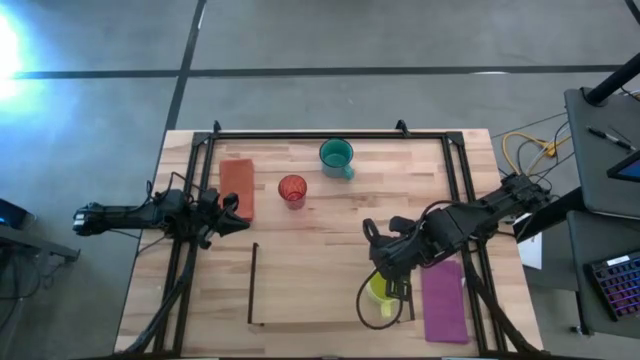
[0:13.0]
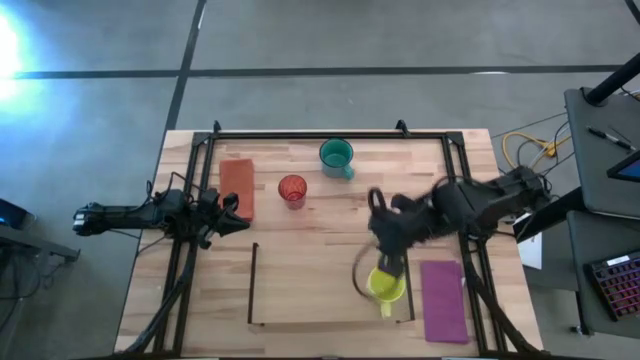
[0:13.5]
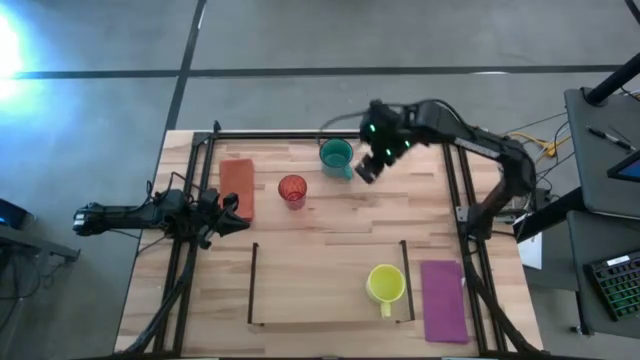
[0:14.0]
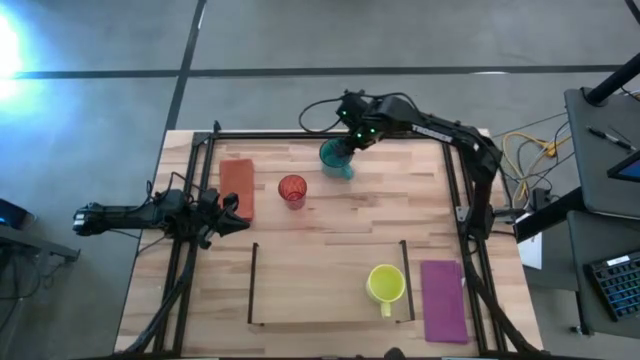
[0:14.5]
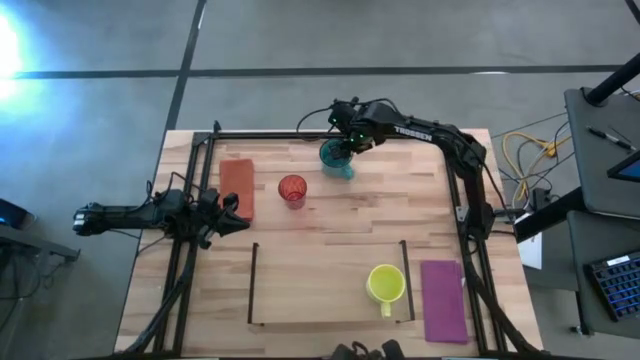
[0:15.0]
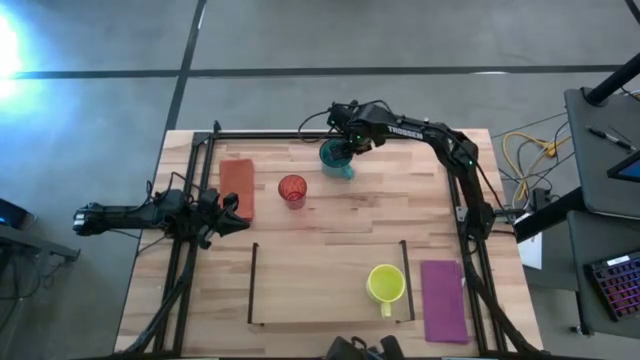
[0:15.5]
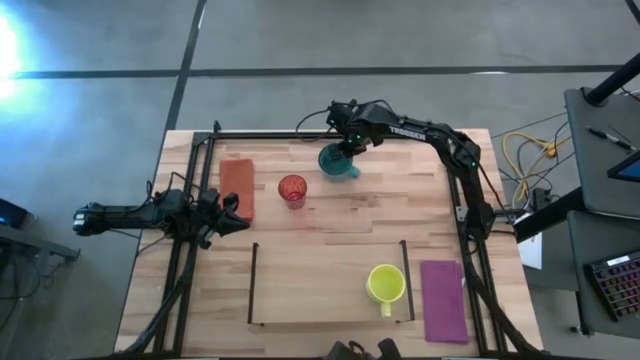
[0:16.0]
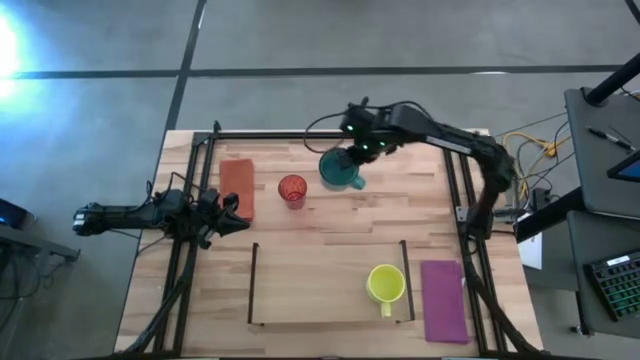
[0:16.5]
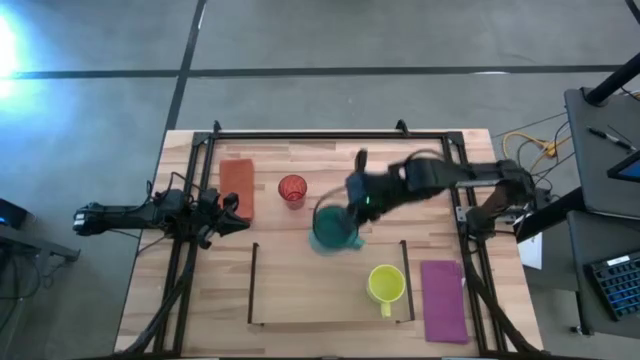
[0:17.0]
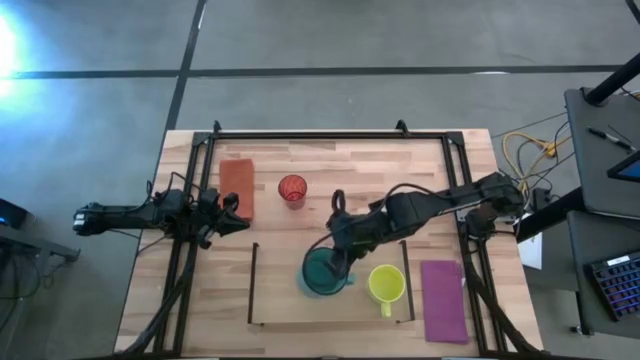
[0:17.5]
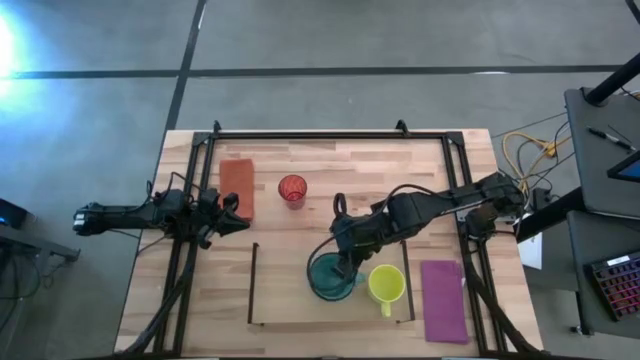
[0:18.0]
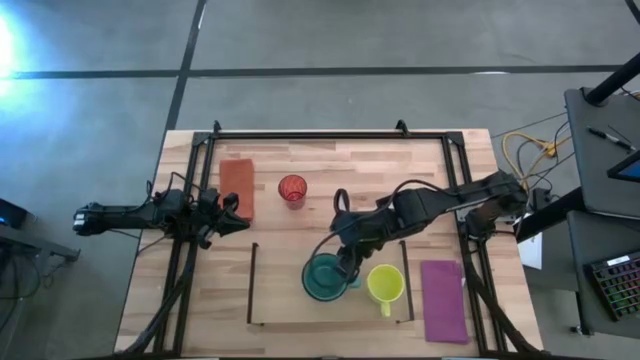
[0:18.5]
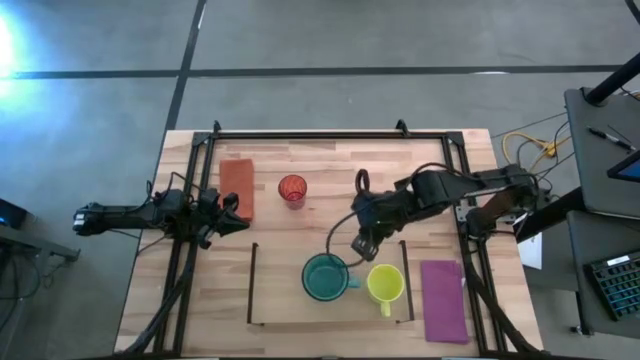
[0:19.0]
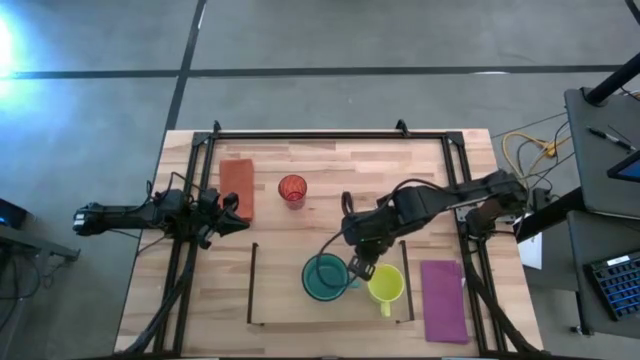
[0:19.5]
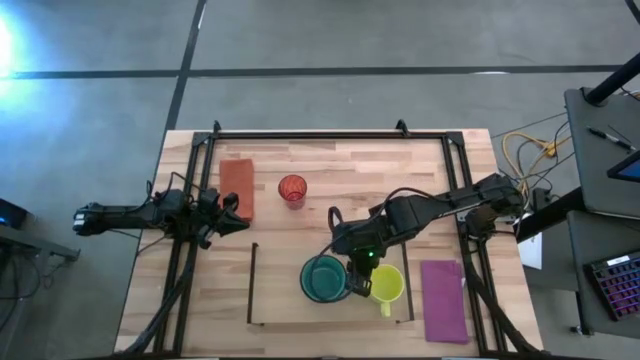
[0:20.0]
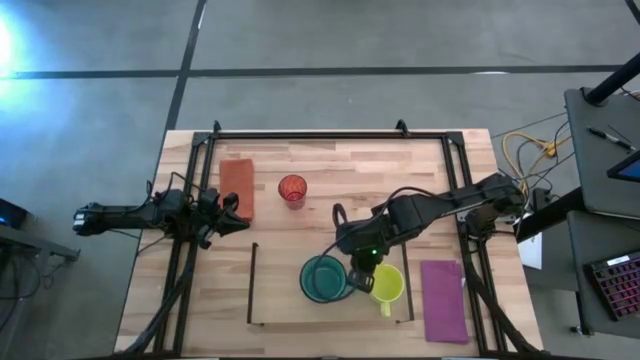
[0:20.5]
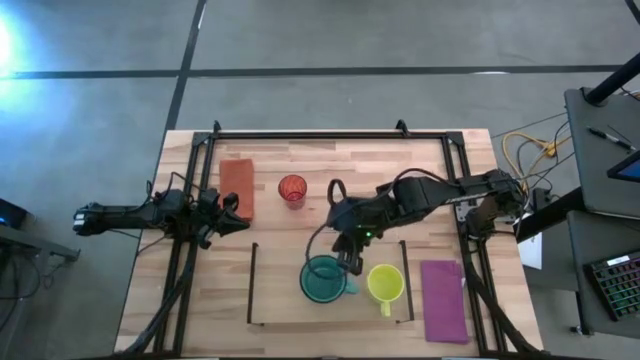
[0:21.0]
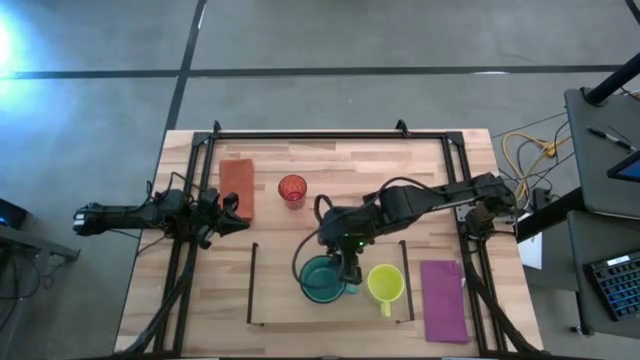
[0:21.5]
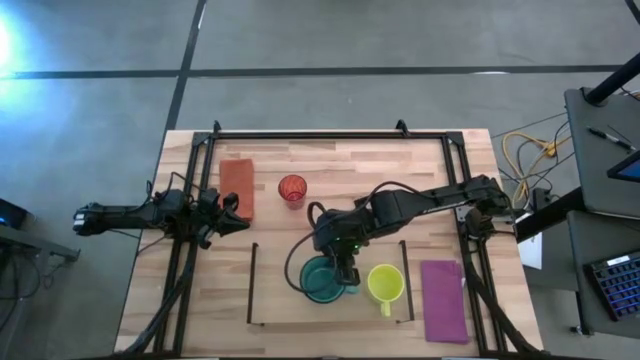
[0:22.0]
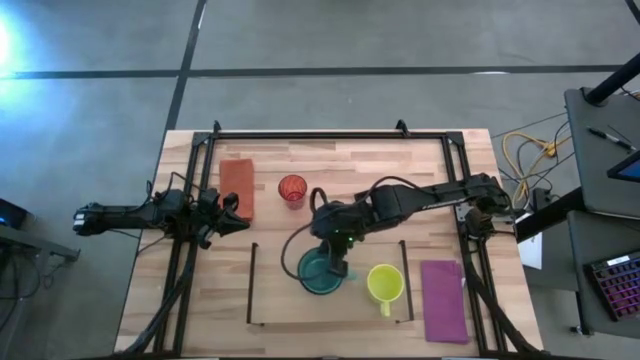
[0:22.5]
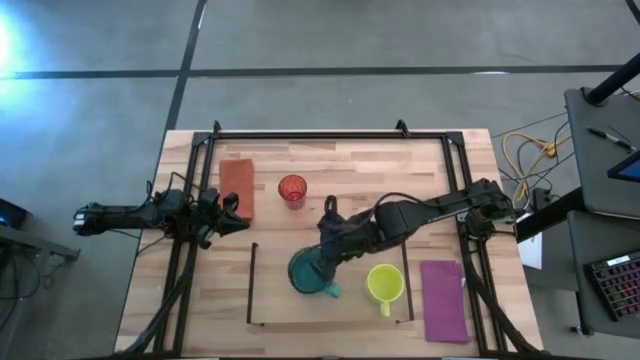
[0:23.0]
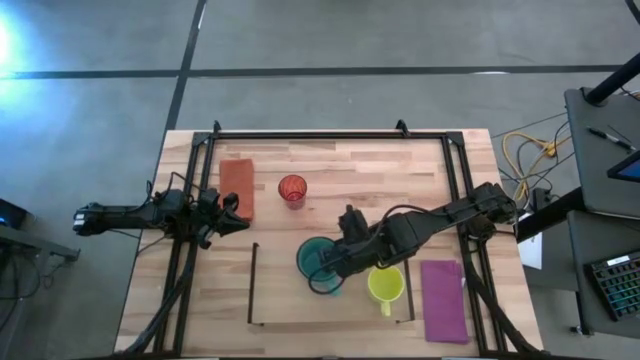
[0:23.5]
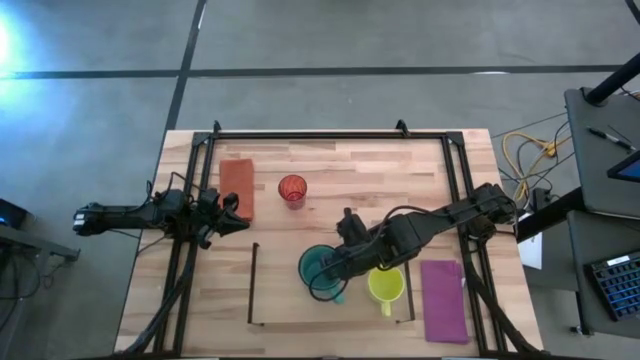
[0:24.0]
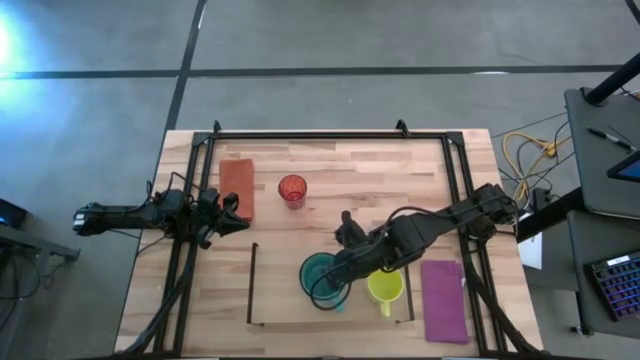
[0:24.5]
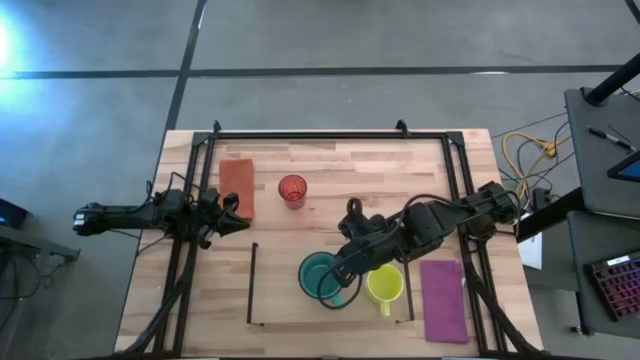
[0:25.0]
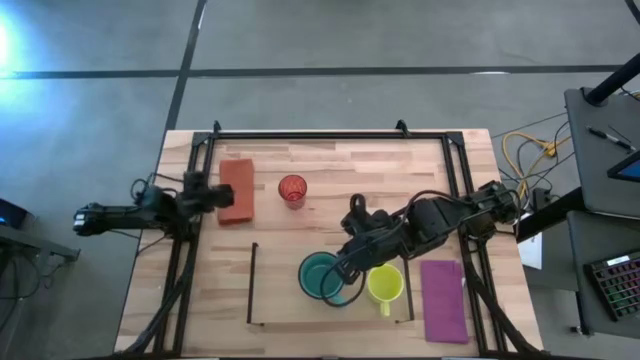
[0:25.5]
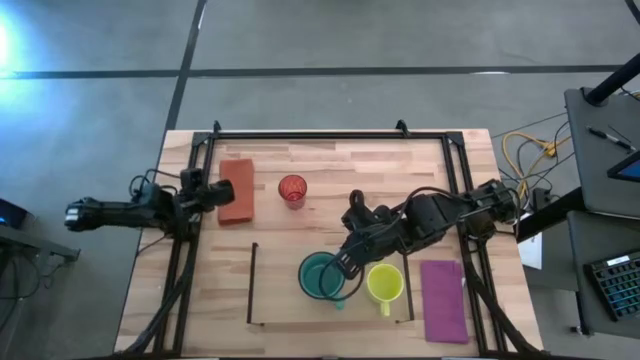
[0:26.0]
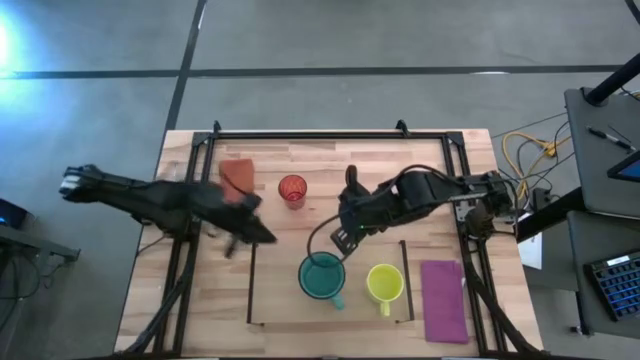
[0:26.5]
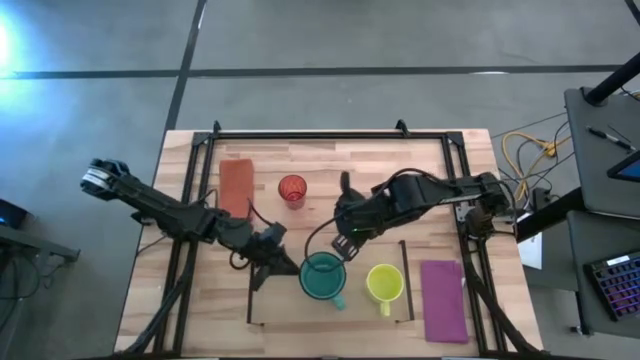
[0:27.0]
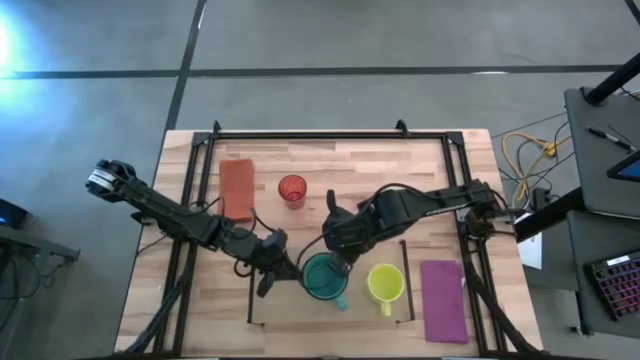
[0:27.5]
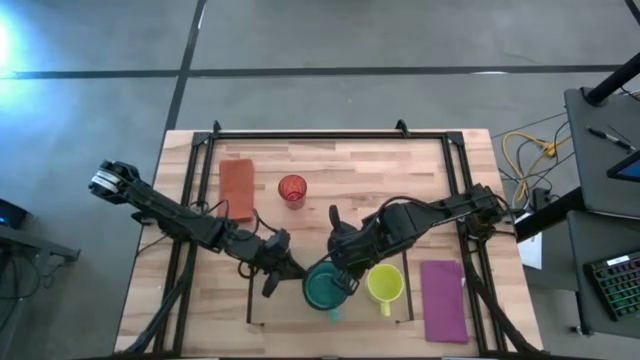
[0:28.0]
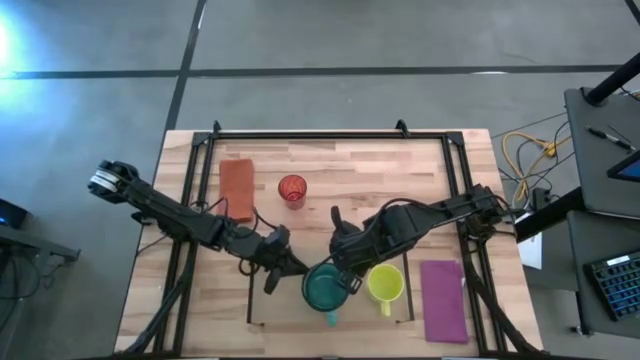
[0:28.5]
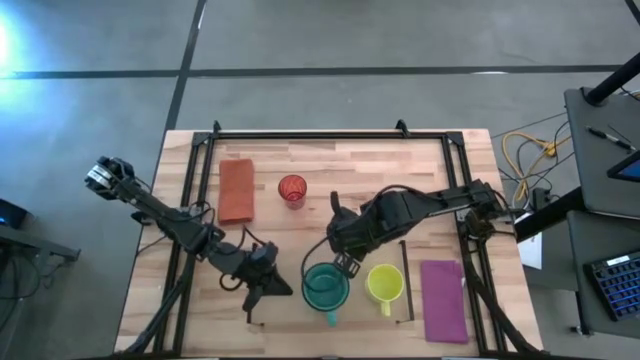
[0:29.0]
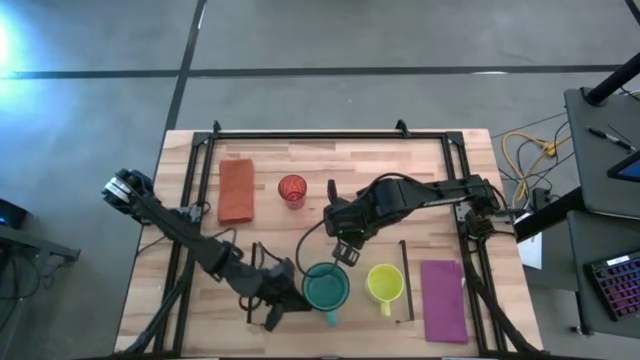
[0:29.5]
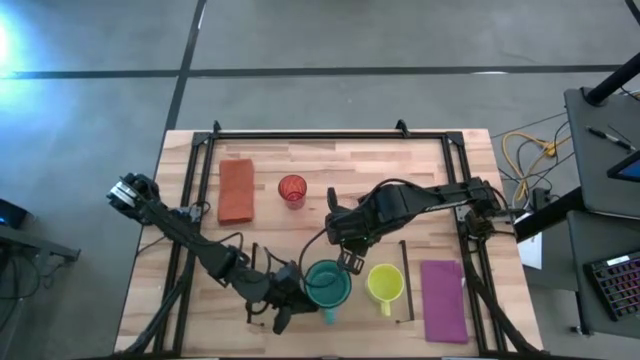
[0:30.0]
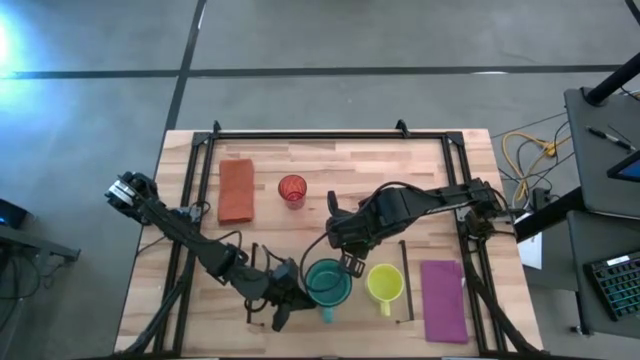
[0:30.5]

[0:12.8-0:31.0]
Task: Stack small to large cups/mugs on shelf
Put the green mug on the shelf

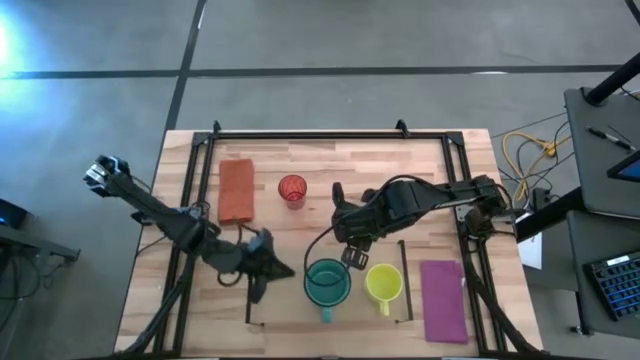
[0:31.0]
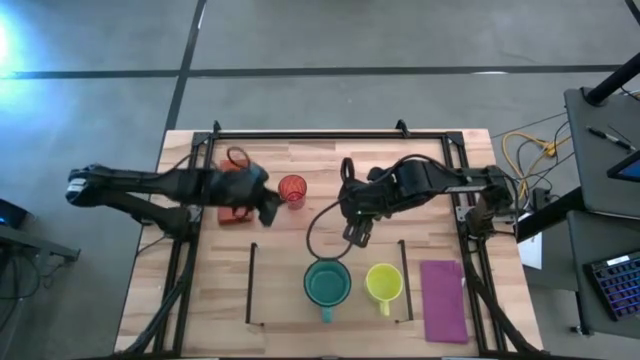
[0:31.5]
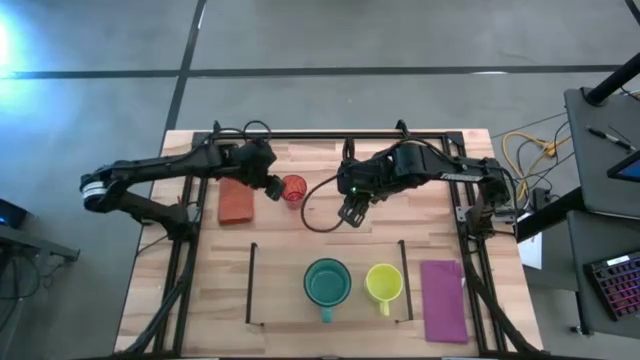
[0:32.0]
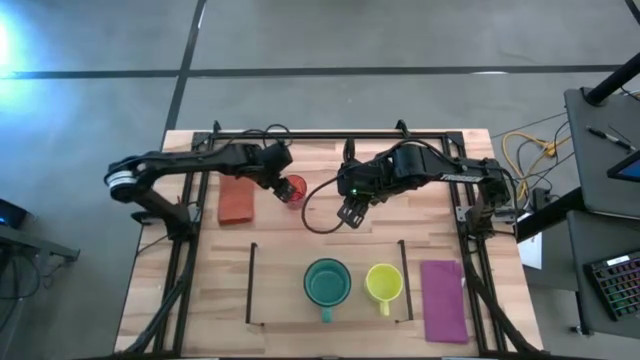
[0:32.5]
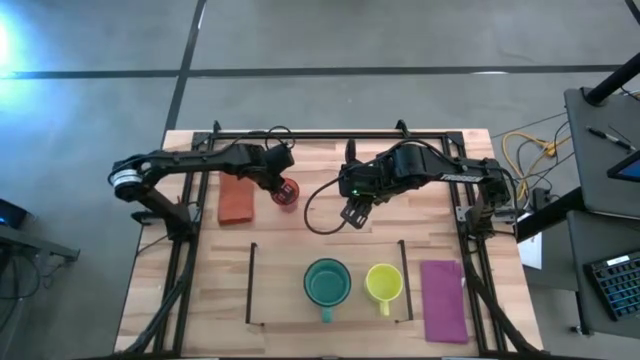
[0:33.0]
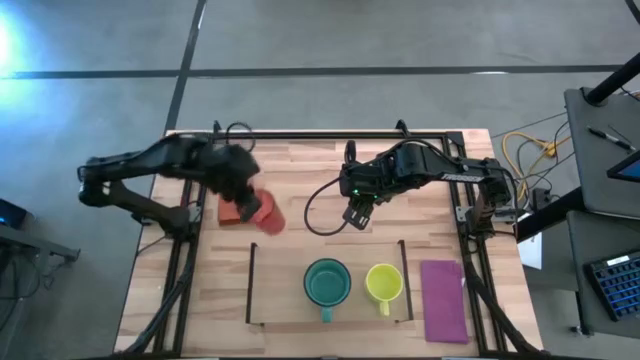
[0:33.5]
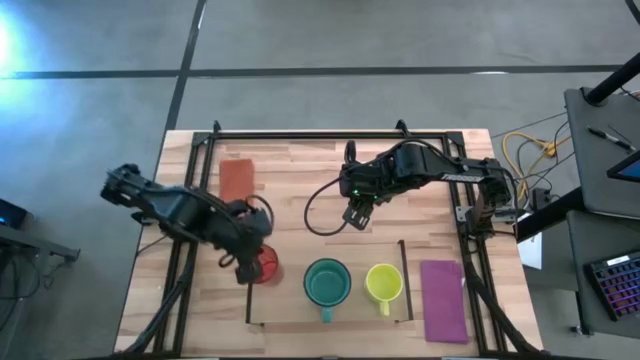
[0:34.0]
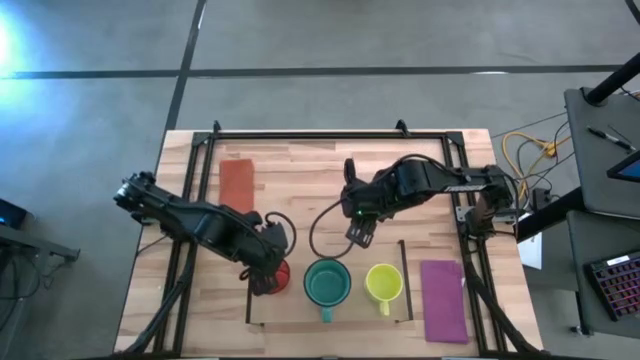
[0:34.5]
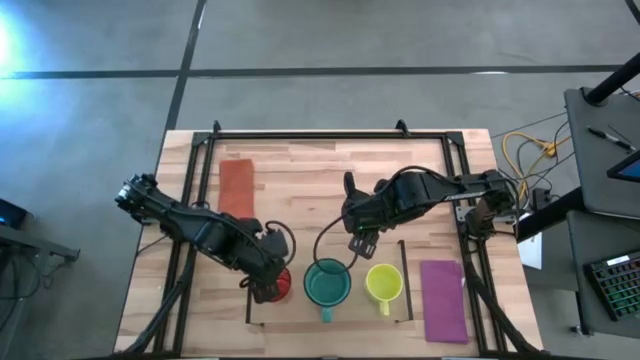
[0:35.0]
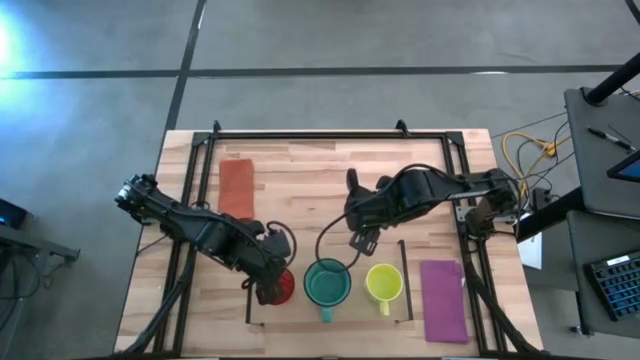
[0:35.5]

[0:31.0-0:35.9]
Put the red cup on the shelf
